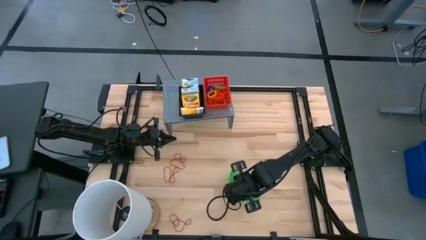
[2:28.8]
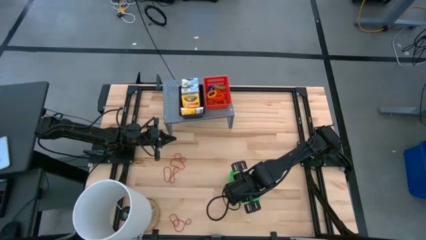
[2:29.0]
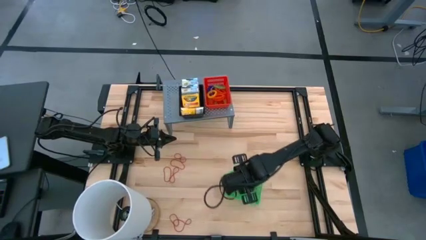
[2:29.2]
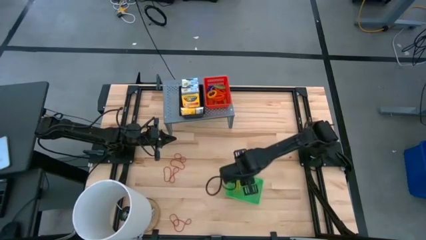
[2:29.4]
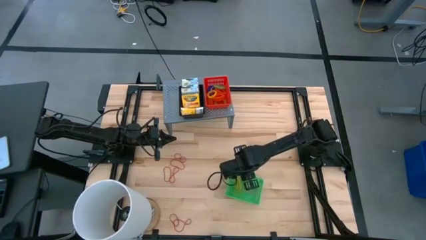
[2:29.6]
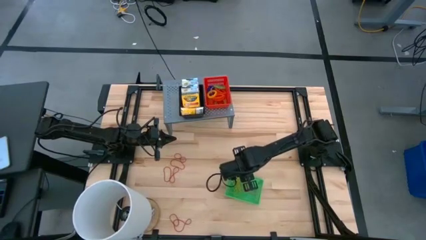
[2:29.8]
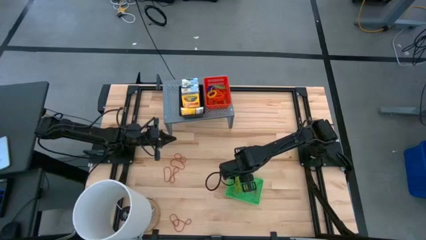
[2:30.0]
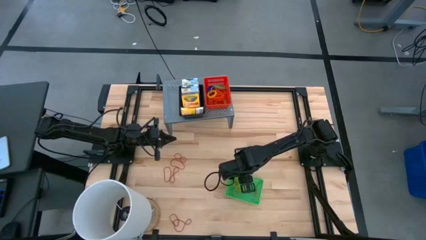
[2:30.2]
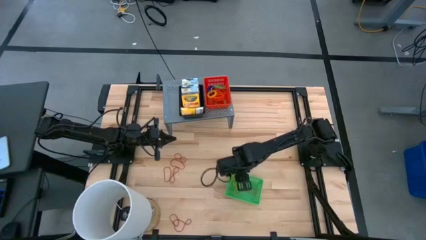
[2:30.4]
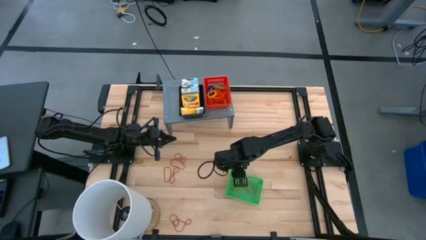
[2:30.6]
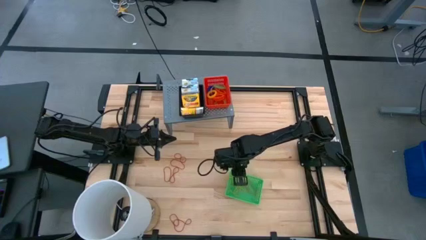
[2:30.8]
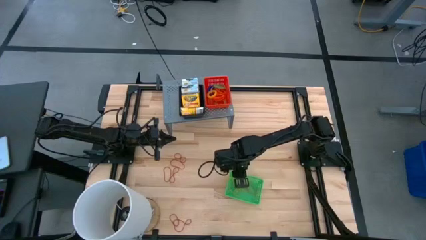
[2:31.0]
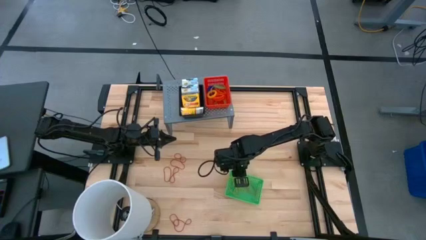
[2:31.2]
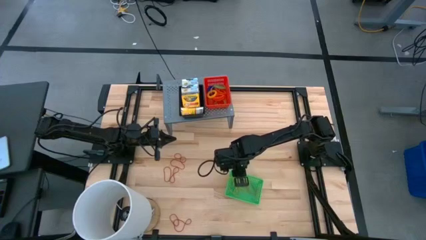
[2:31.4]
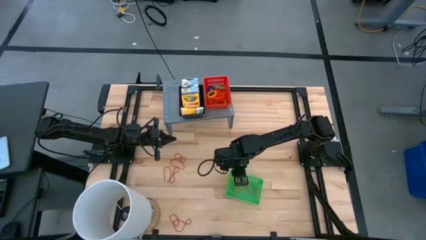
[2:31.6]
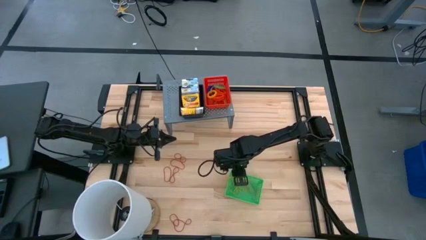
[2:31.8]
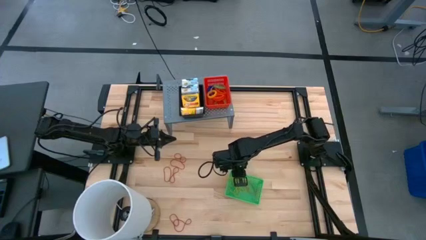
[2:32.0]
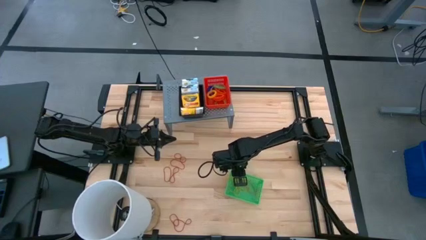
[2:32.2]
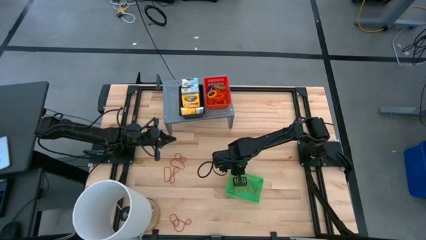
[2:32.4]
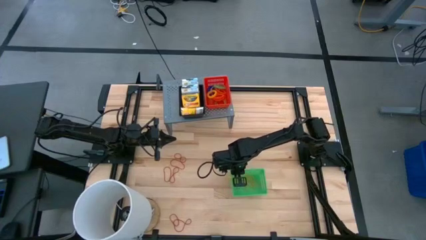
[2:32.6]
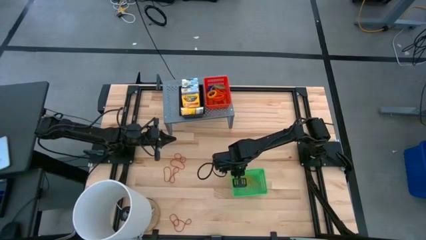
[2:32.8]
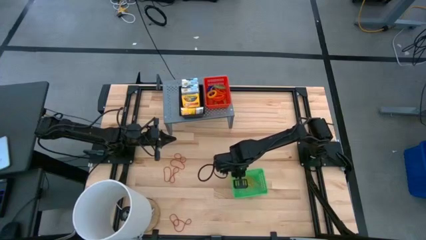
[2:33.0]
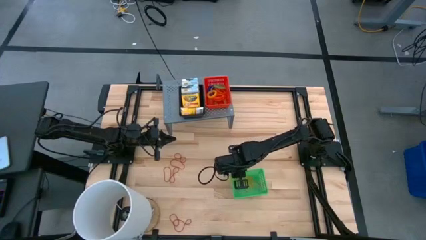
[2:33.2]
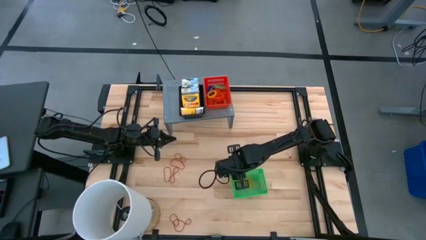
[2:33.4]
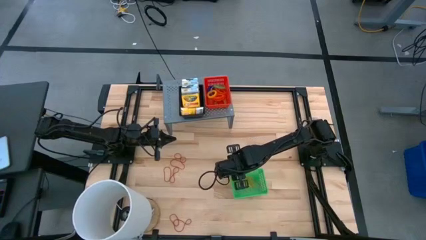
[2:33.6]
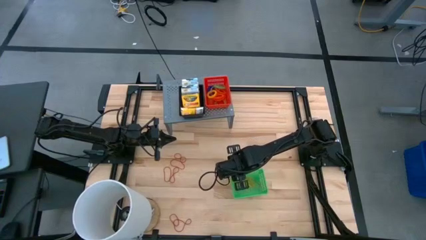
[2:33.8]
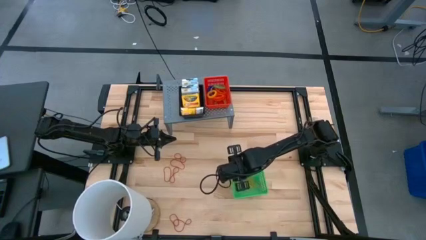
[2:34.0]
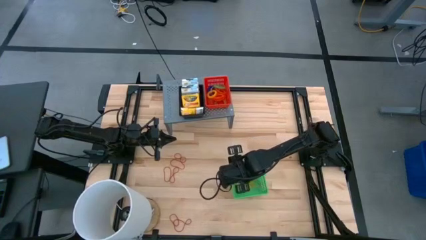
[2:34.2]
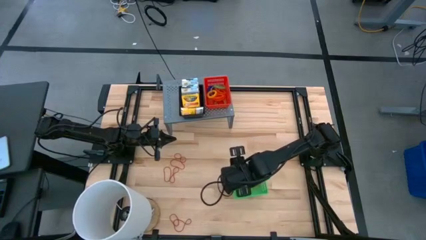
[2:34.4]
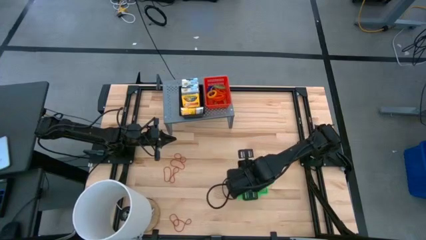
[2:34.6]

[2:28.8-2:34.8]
Task: Pick & Place Office Desk Supplies
Put the yellow rubber band into the green bin

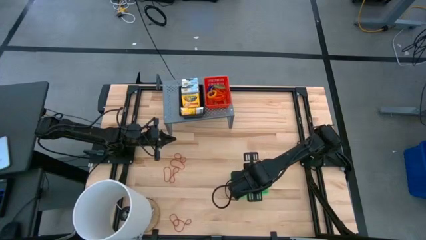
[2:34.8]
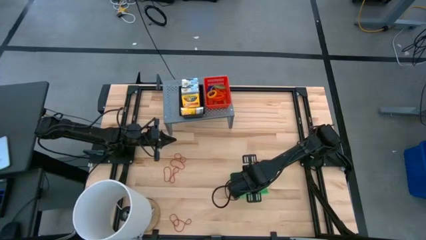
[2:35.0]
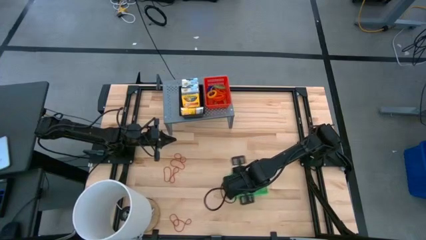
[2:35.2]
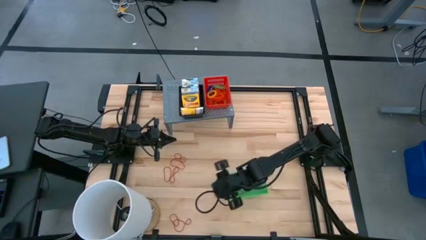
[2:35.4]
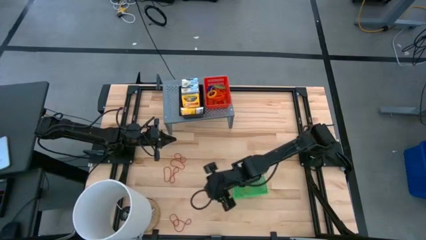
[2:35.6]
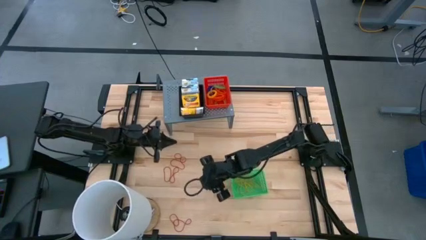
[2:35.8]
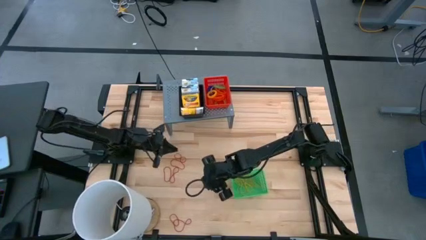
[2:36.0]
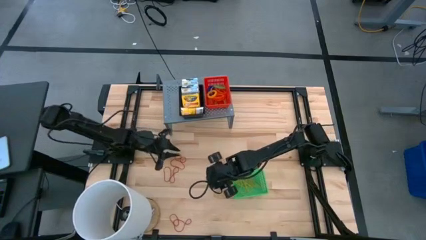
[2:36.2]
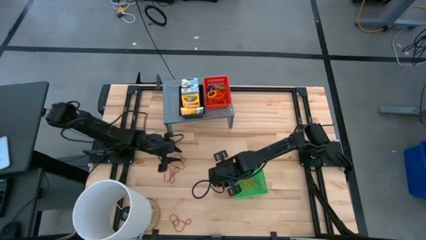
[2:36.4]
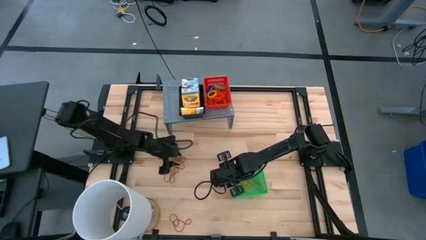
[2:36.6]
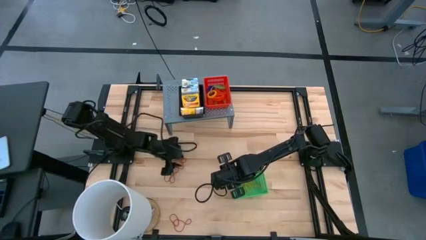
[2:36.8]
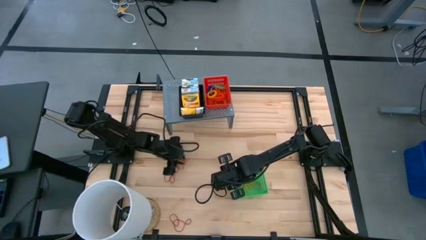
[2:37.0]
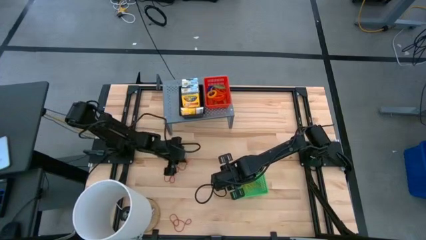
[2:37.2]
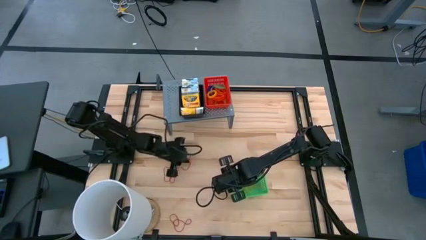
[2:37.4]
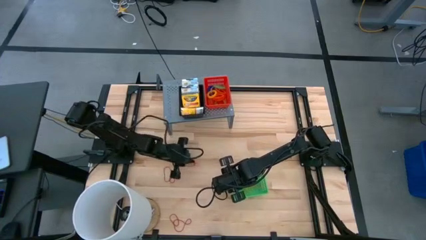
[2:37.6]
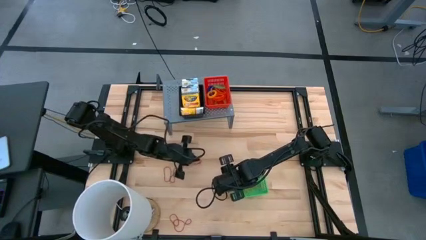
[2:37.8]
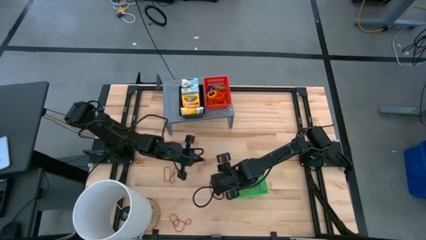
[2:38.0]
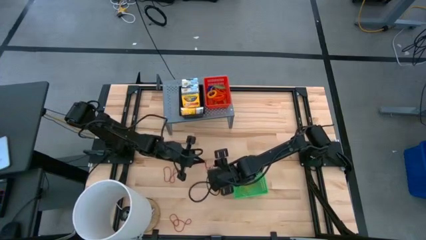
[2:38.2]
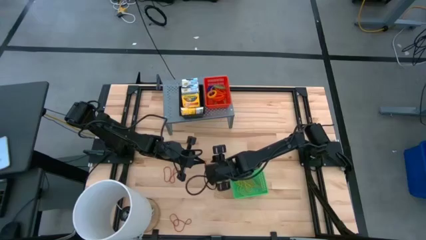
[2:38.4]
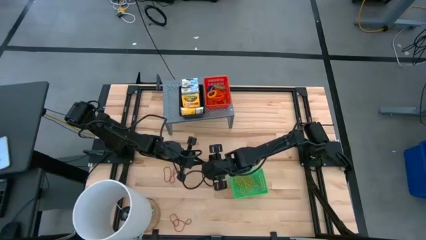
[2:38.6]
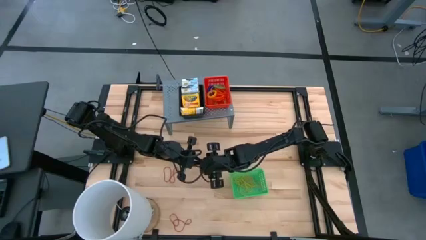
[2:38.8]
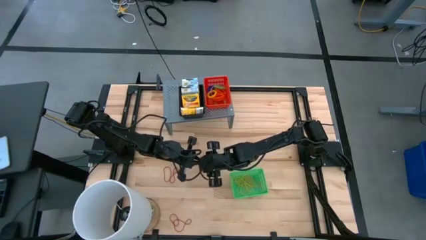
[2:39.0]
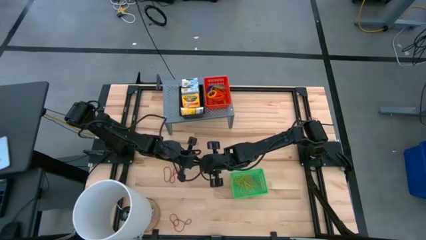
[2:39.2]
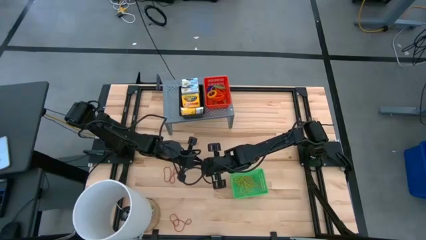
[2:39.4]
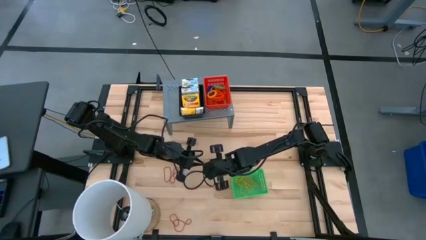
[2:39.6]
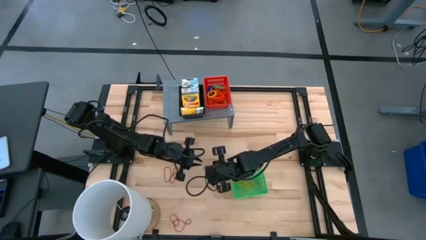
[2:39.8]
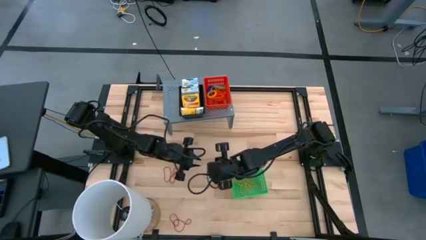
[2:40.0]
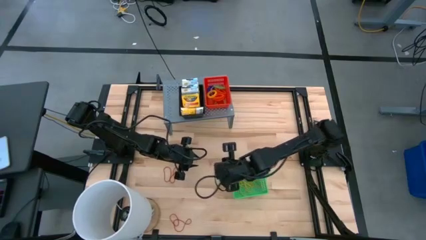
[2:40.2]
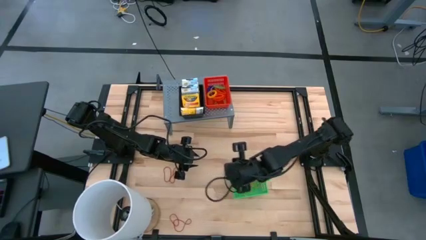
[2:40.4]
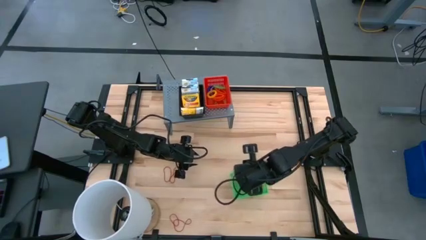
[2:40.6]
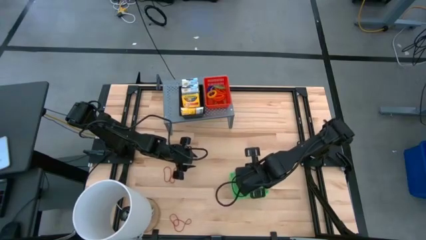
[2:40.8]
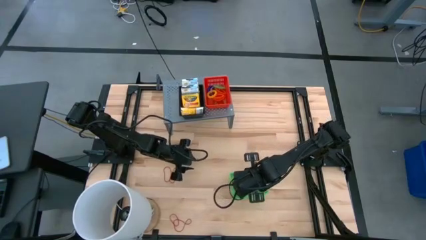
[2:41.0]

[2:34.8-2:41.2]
Put the top red rubber band into the green bin

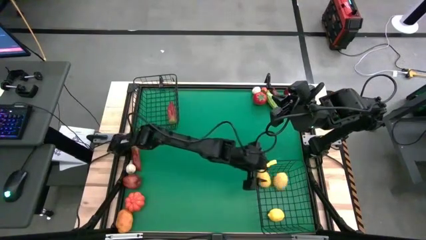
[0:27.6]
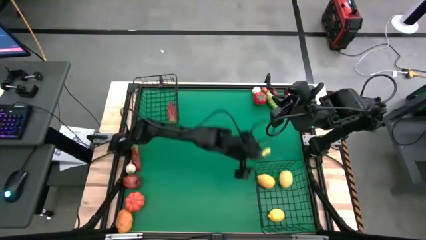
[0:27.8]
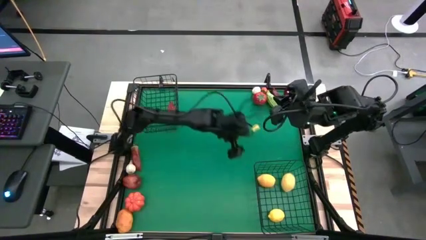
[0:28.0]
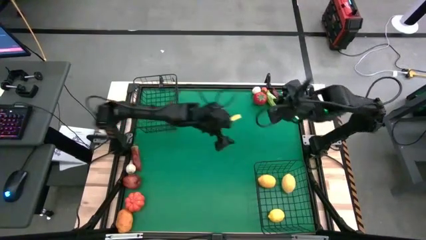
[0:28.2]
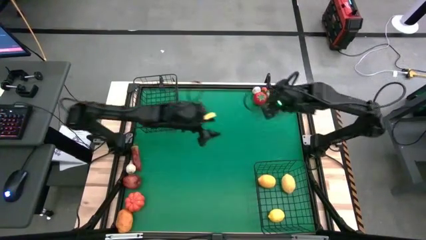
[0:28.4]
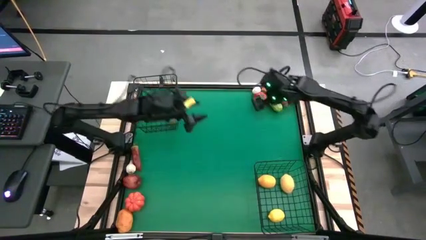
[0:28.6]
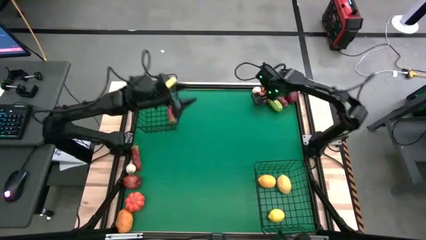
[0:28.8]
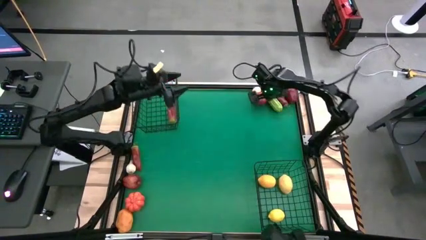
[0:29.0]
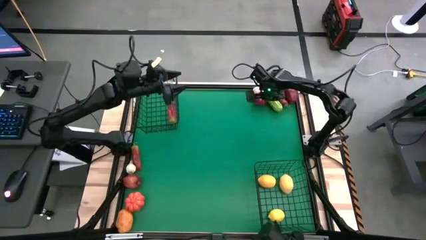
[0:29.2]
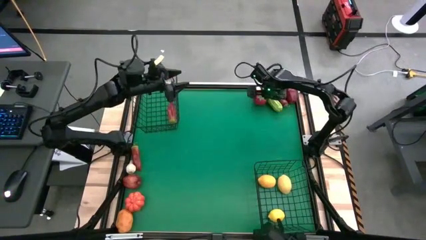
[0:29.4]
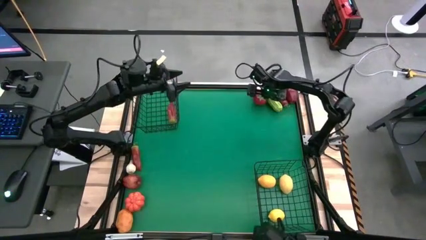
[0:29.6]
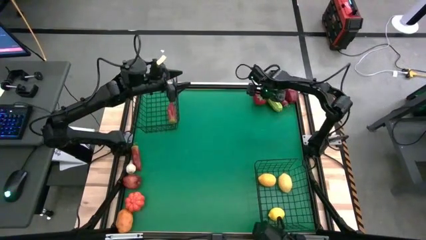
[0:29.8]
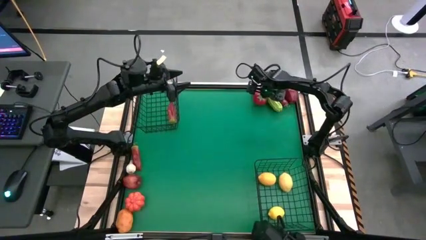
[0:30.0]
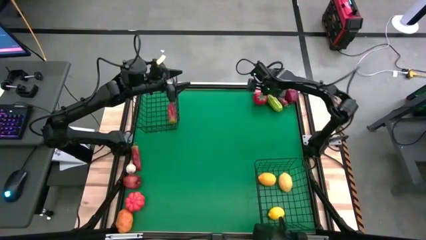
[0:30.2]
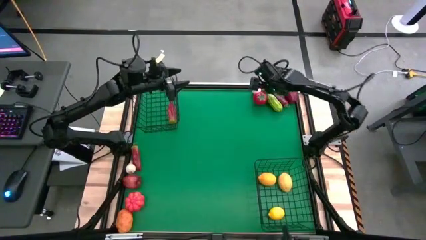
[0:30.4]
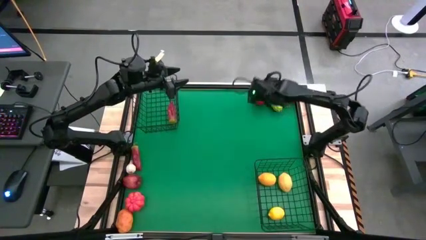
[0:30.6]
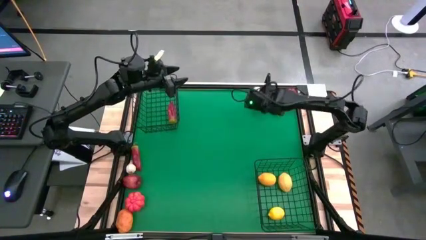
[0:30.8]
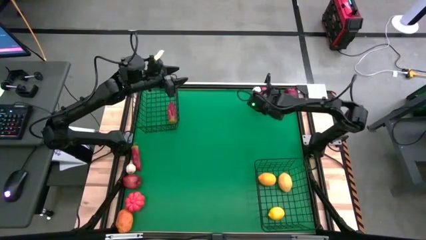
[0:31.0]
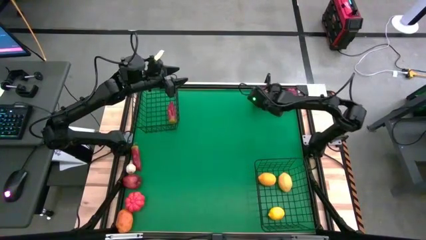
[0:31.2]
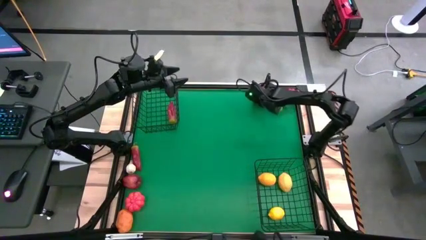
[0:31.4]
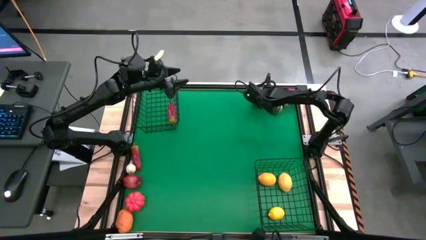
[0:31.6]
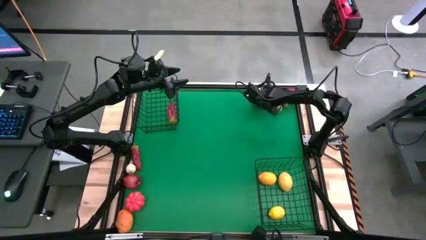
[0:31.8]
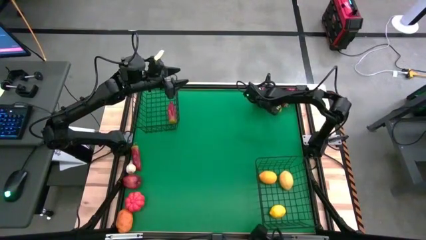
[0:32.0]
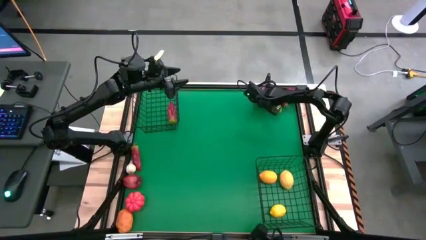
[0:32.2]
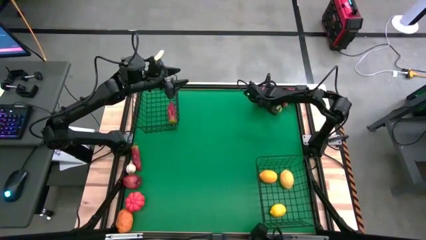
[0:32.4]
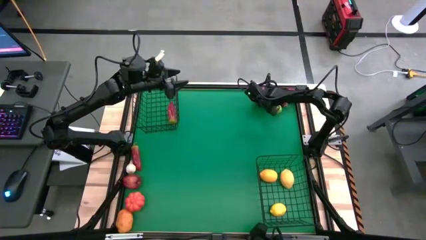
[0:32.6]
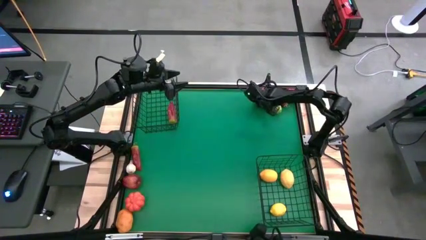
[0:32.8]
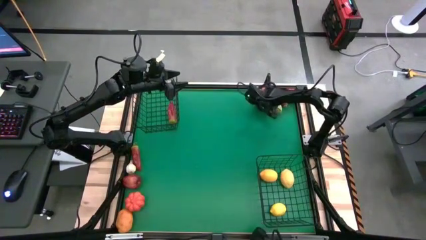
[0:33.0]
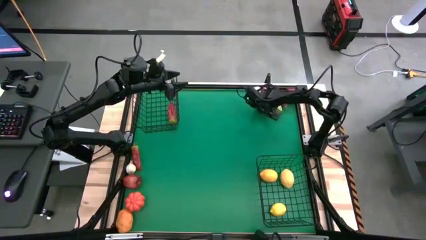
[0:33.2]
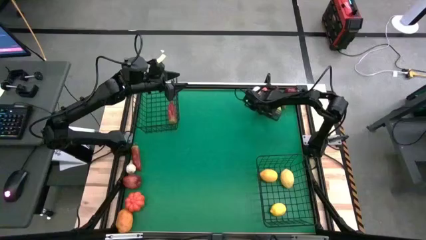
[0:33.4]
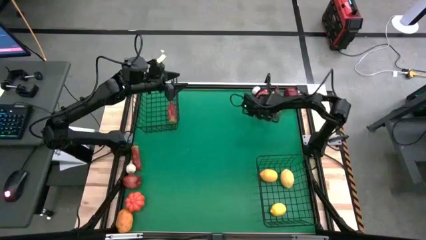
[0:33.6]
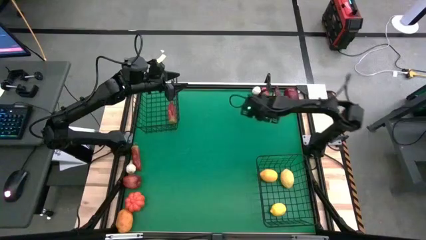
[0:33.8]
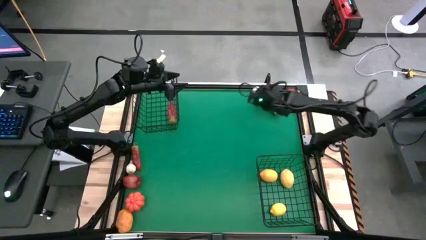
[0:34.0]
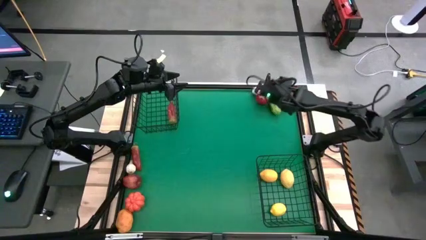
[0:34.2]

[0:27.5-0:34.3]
Task: Sort produce into baskets
Put the red tomato into the bottom black wire basket
